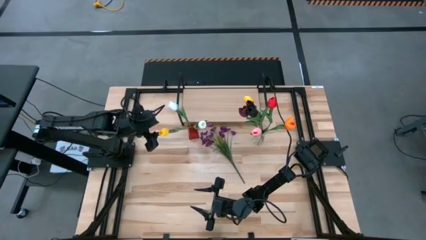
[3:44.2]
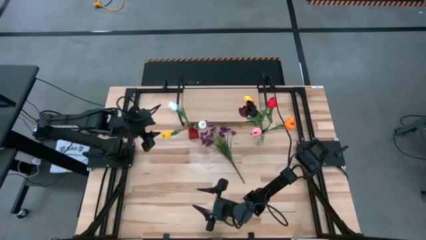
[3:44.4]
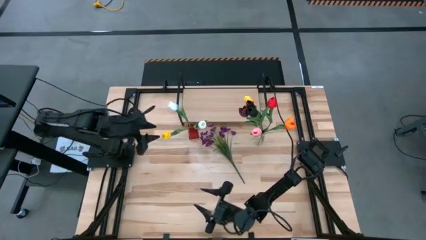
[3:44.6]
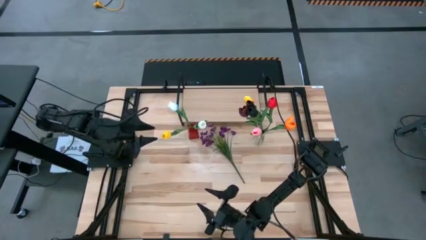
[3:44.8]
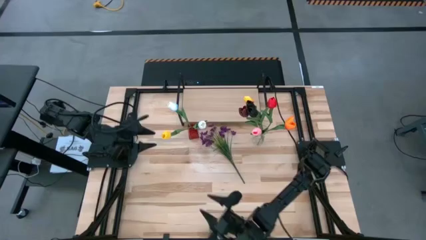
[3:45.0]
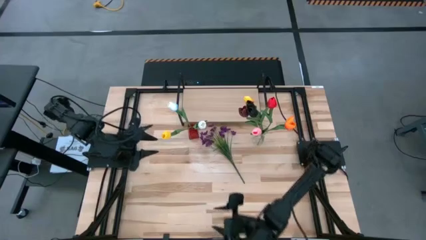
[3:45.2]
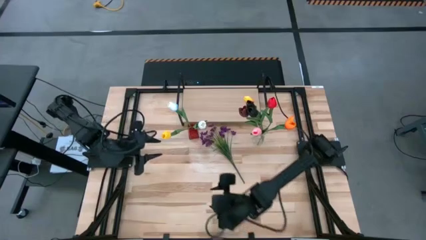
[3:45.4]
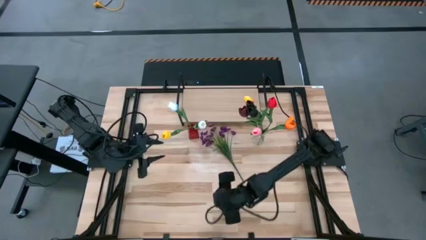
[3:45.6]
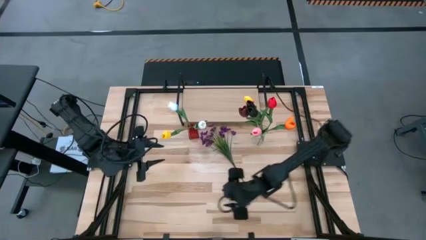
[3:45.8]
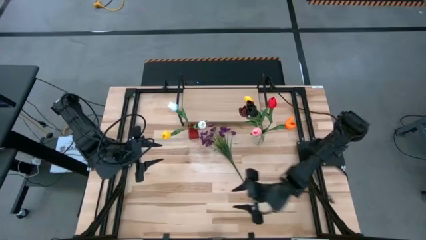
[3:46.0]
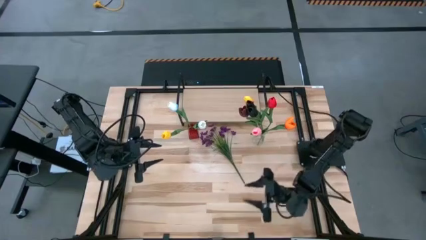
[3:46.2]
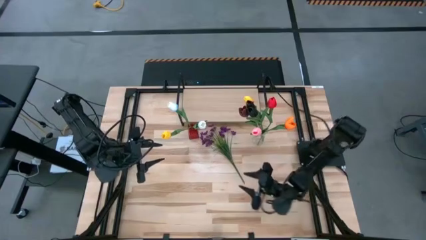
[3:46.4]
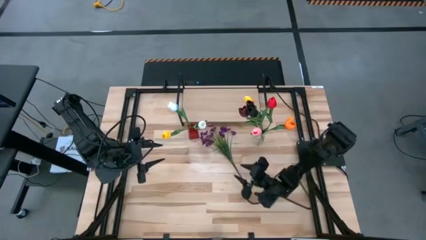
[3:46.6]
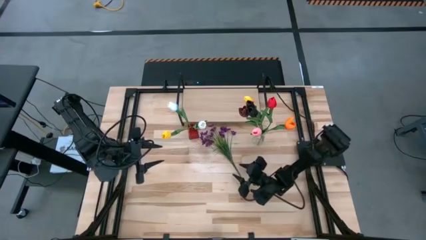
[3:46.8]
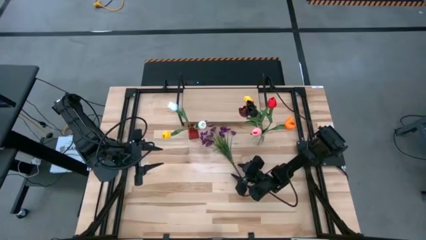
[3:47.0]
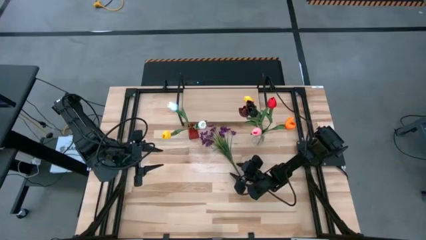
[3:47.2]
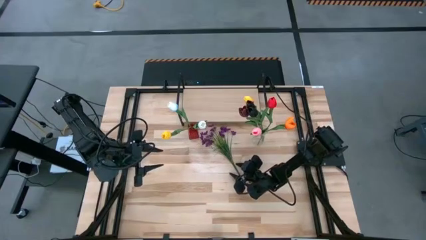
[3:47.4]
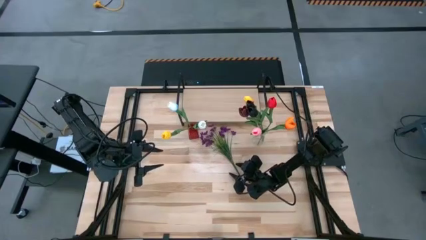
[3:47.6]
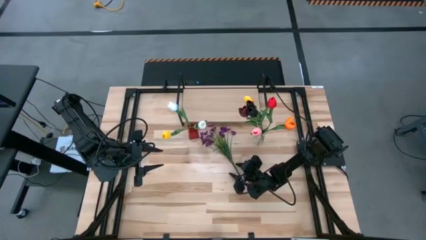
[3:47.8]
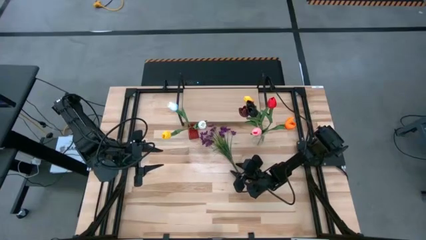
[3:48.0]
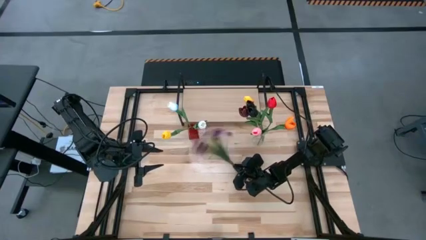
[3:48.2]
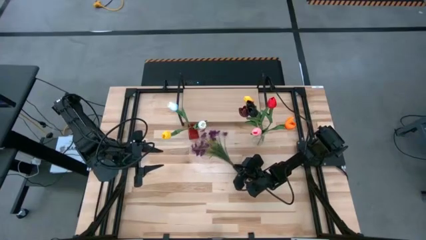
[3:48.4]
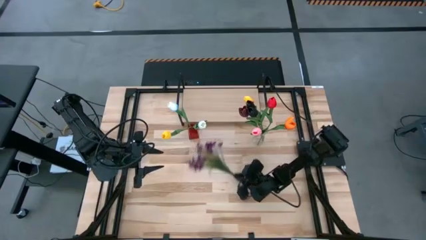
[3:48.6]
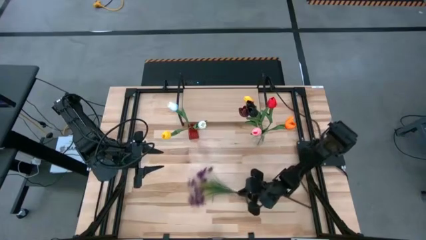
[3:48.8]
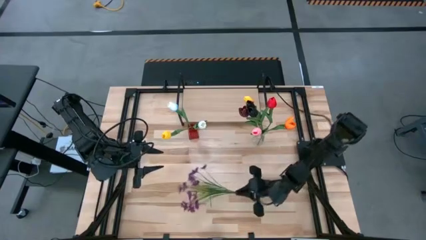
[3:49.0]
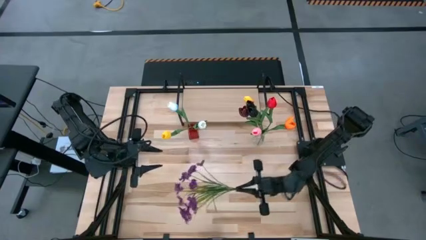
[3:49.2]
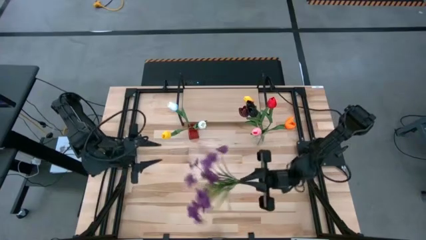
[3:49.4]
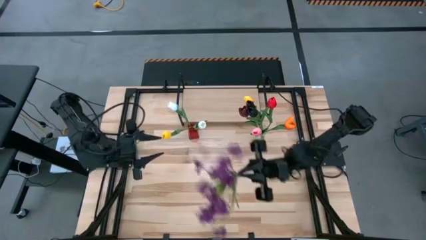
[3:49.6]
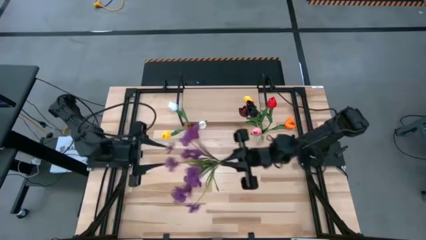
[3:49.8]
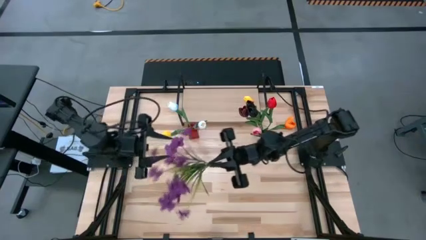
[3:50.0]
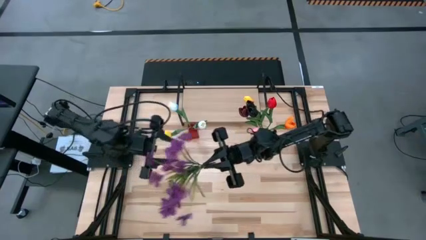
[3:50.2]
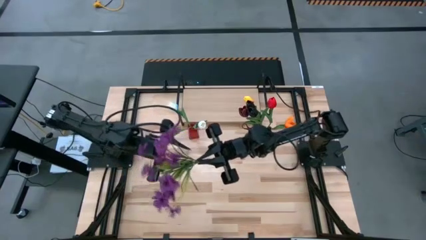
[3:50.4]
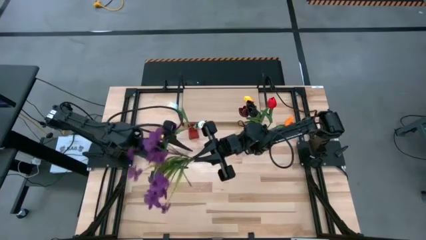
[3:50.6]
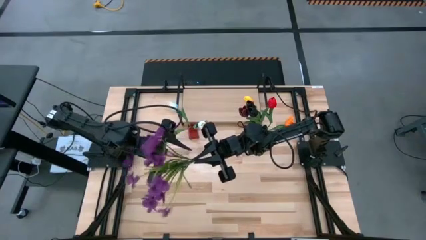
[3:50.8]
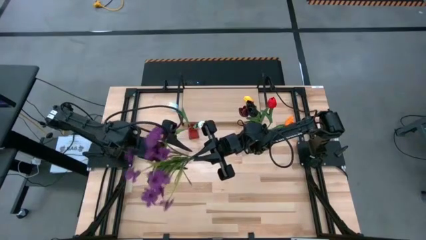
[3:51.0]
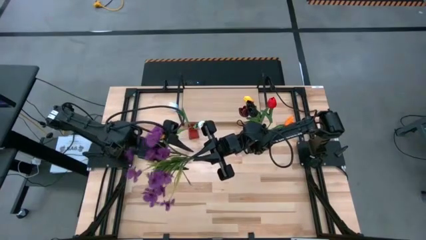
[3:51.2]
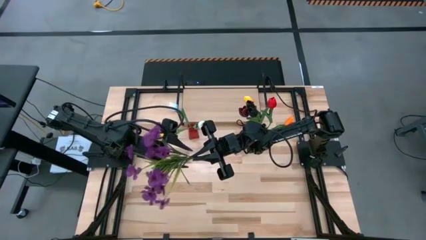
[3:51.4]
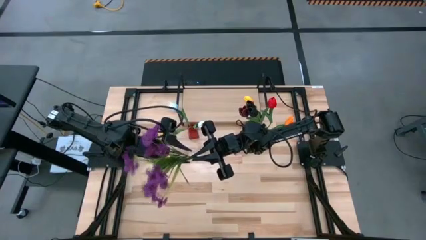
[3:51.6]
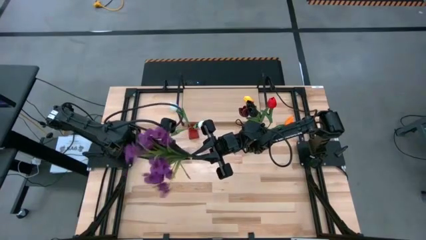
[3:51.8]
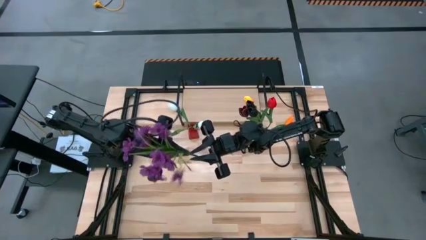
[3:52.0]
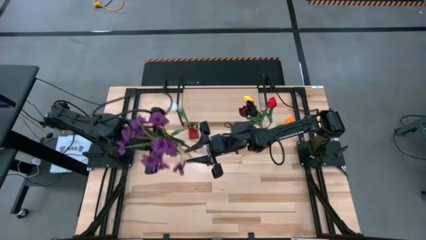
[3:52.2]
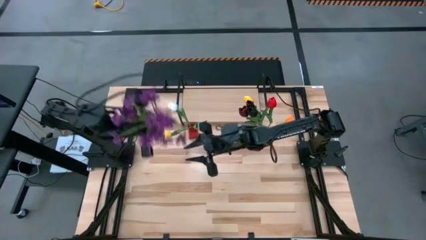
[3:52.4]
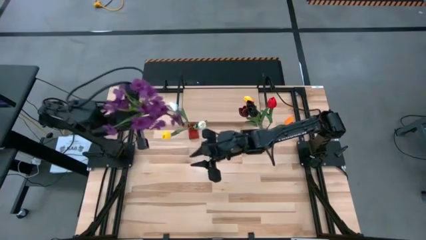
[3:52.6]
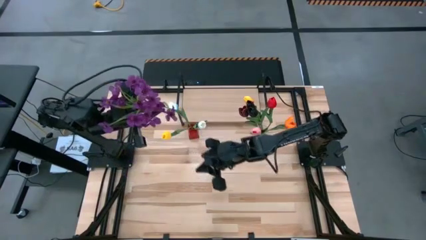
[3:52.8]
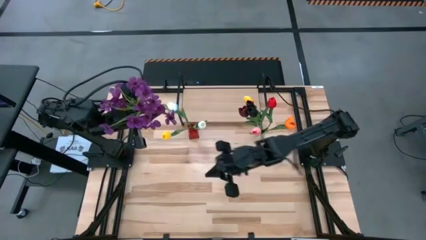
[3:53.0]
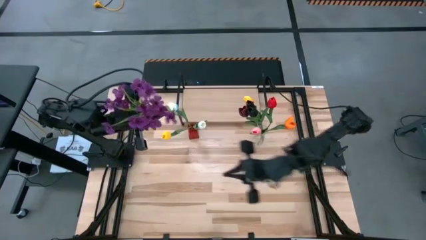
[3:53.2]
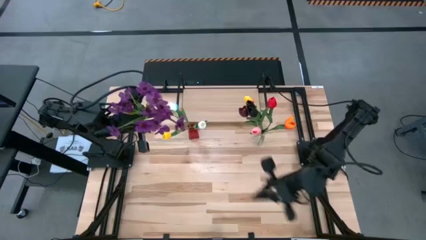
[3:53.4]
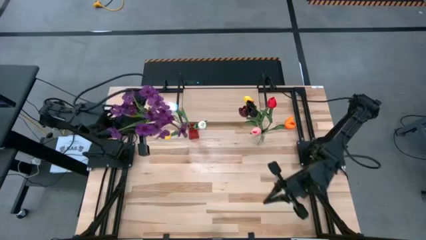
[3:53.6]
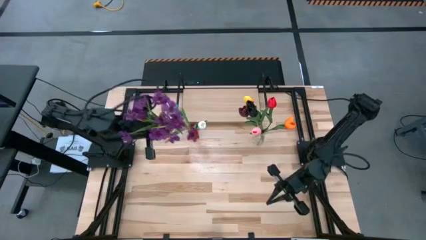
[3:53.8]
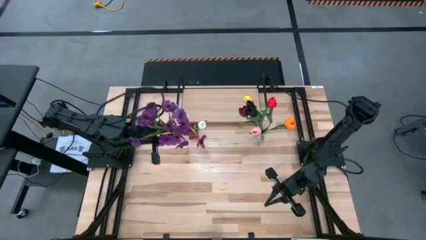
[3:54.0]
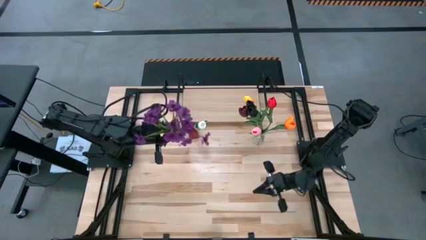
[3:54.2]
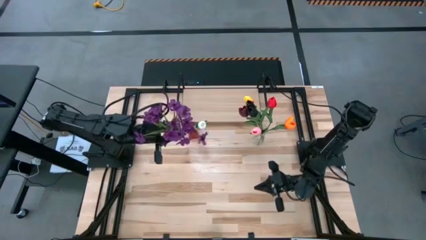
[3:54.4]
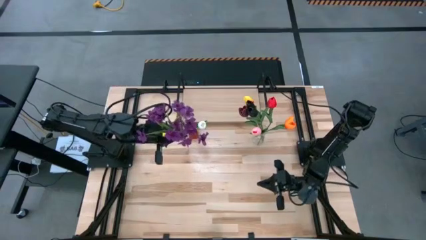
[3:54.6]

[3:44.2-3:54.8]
Task: Pick and place flowers into a vace then onto a shelf
Put the purple flowers into the red vase

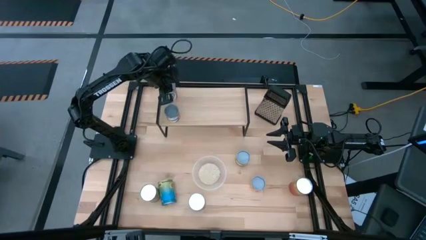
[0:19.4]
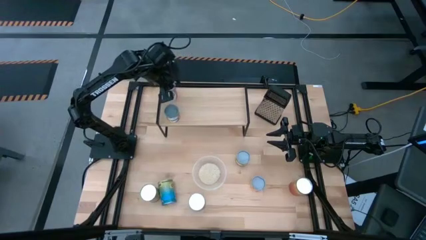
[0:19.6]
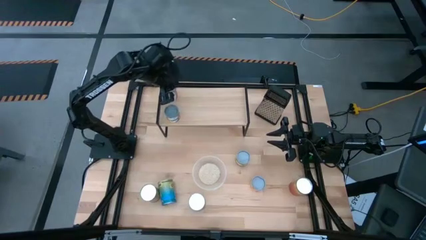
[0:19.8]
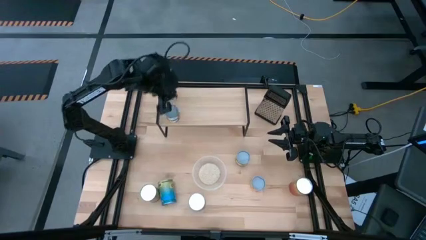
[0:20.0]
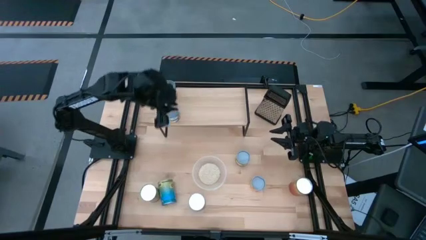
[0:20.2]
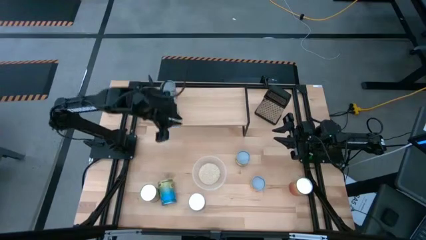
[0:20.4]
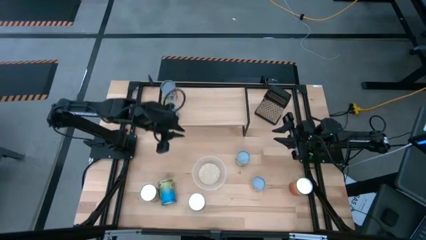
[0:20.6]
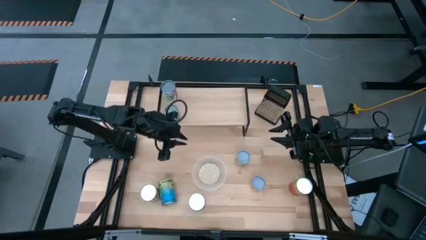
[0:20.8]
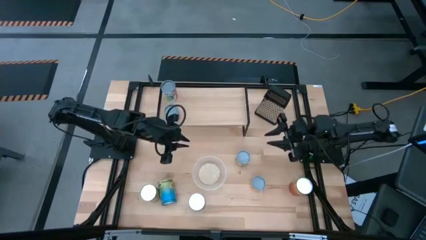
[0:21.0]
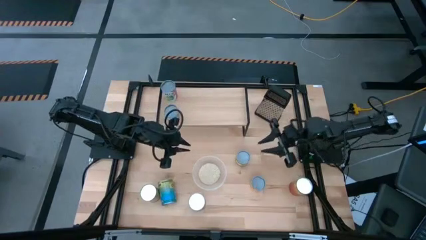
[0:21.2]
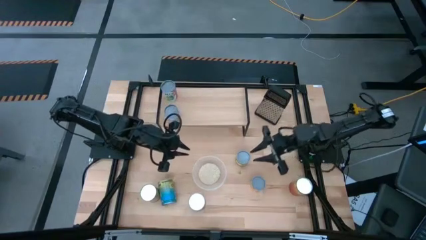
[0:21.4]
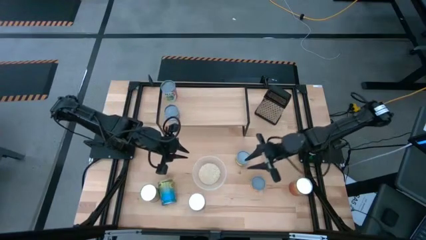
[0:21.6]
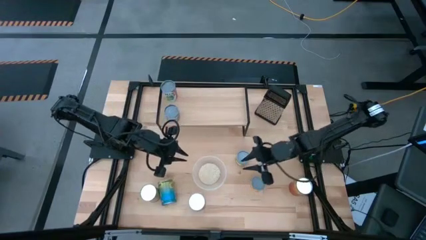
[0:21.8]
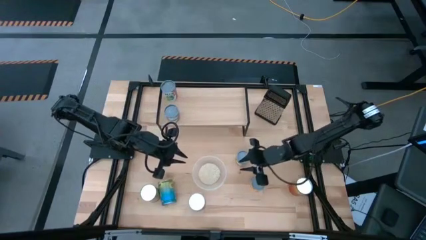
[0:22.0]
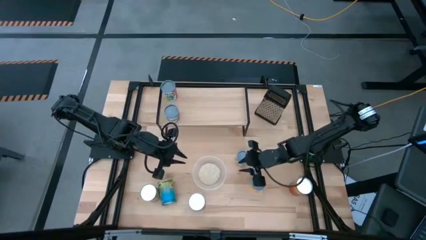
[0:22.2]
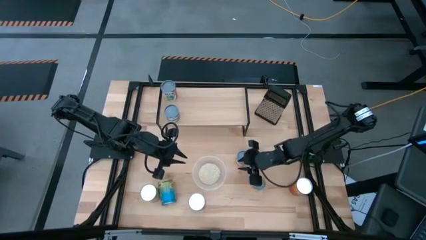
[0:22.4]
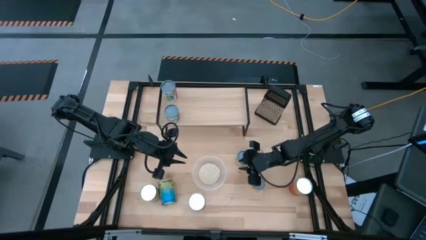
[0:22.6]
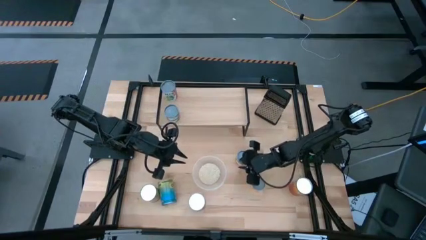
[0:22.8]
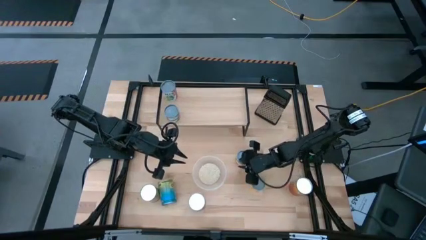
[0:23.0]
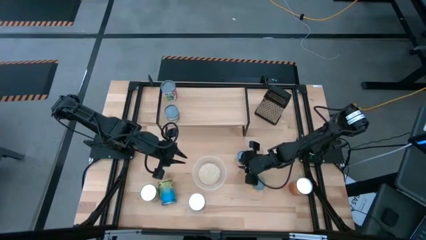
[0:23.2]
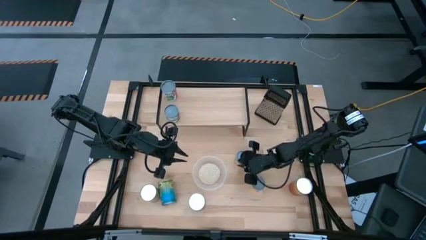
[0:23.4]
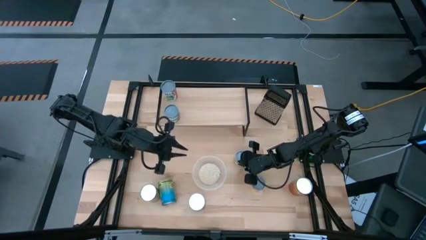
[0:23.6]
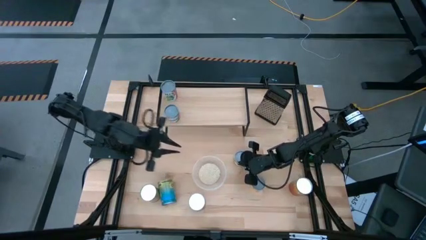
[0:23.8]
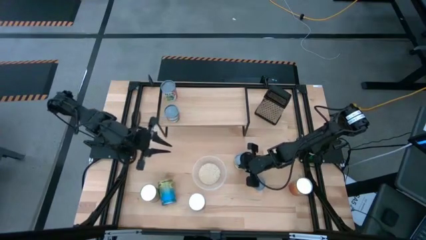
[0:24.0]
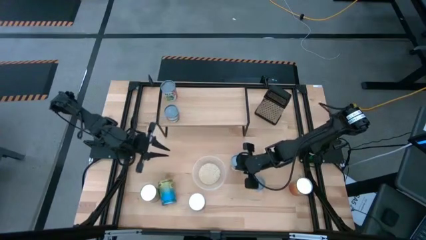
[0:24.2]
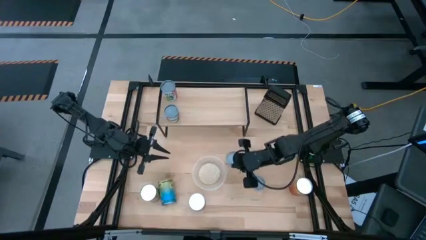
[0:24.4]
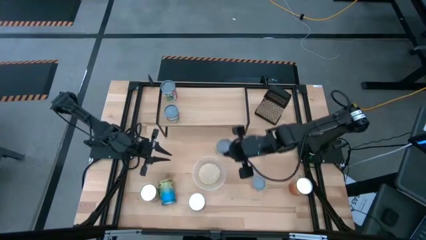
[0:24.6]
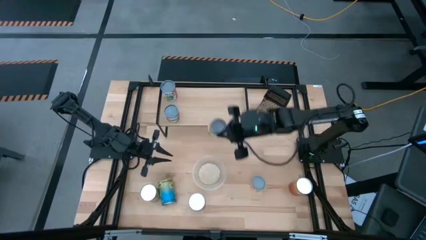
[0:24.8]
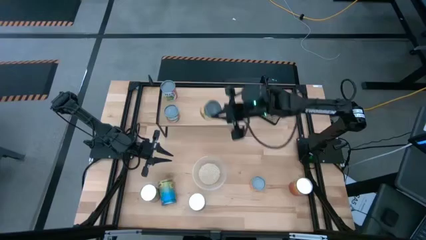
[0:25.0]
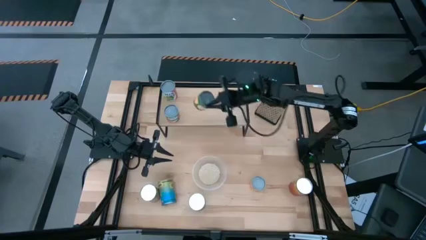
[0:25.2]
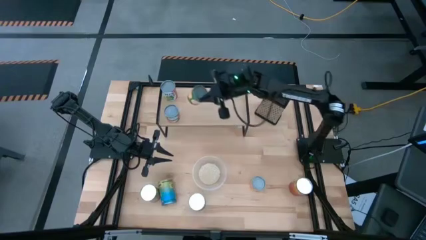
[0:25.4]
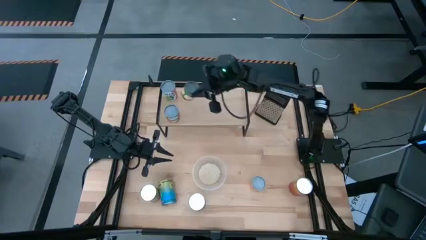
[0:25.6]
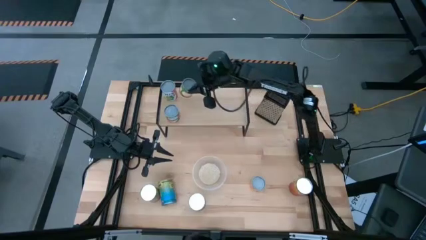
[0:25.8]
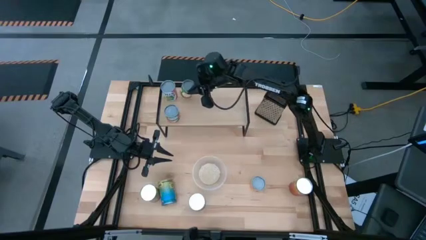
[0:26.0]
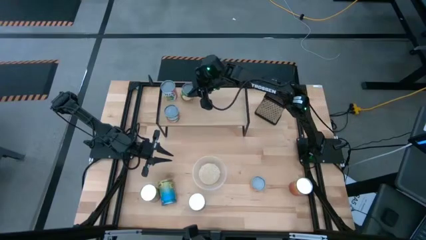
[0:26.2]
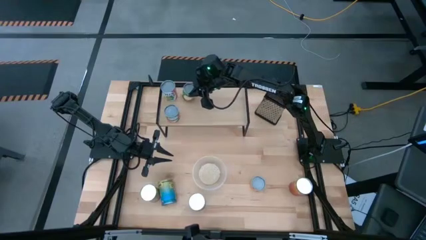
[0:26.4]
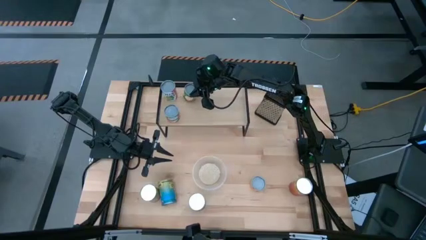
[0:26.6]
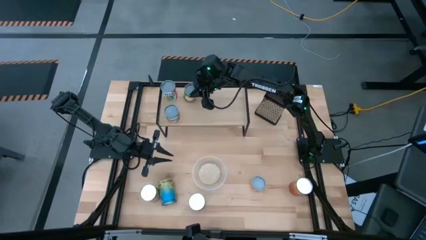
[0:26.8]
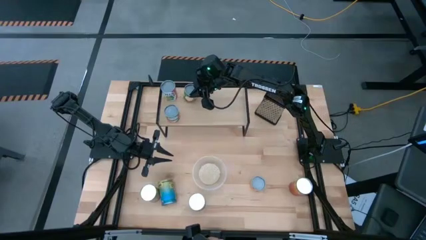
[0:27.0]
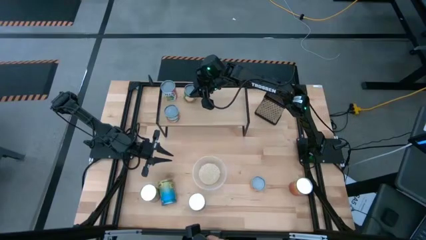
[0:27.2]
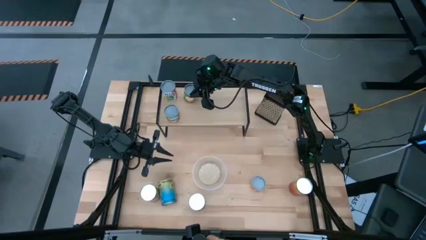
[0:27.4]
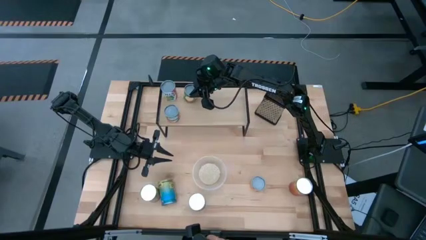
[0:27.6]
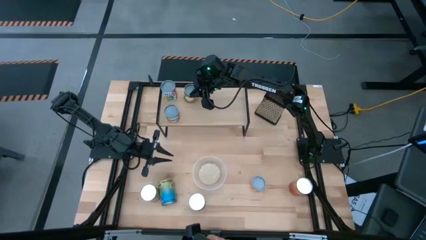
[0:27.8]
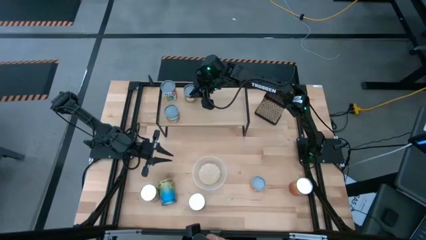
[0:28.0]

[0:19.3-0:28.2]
Task: Pick and place cans onto a shelf
Put the canned peaches on the shelf
